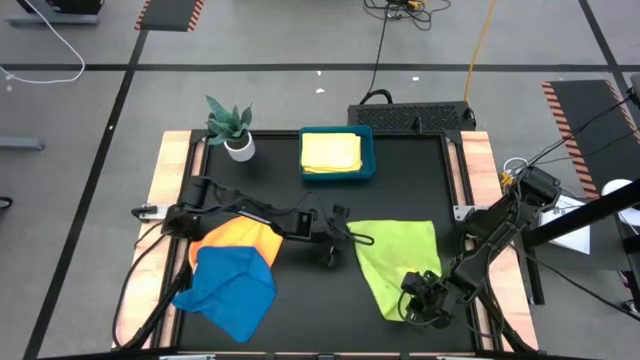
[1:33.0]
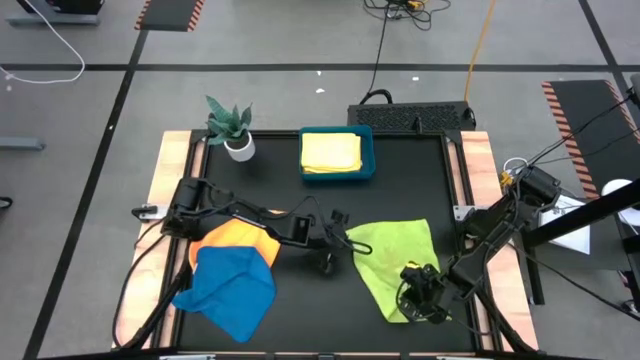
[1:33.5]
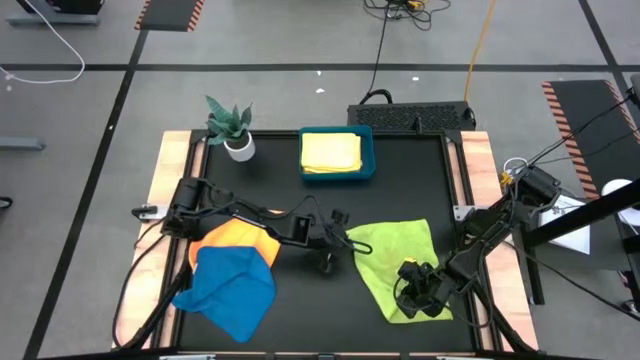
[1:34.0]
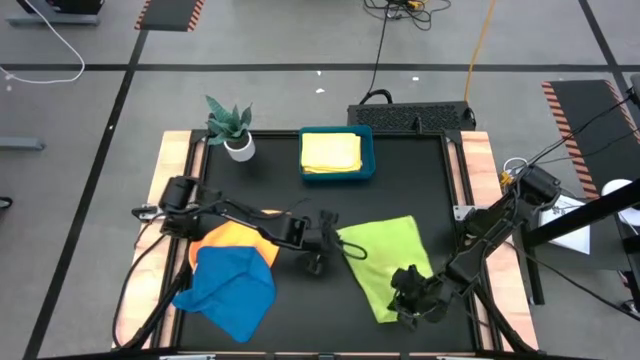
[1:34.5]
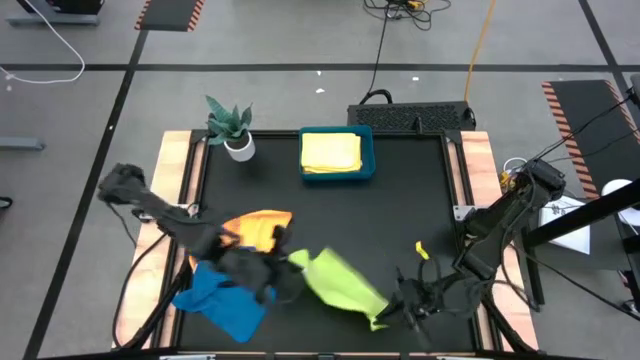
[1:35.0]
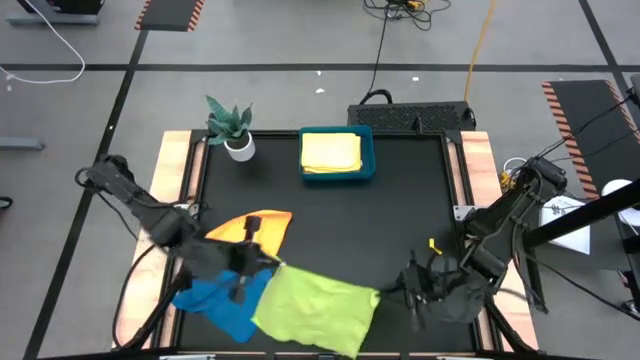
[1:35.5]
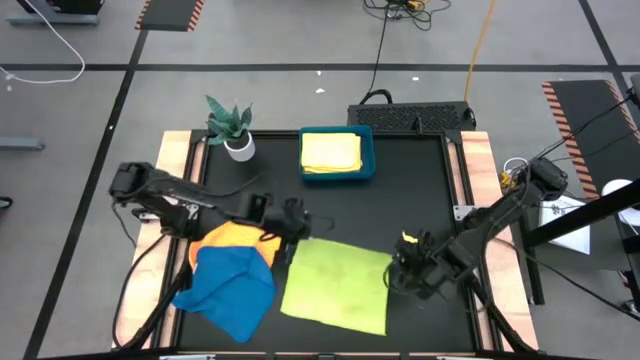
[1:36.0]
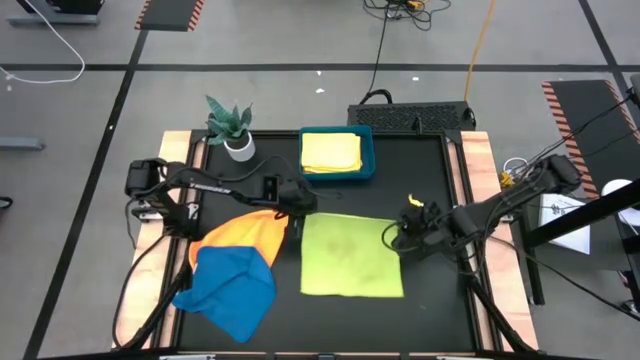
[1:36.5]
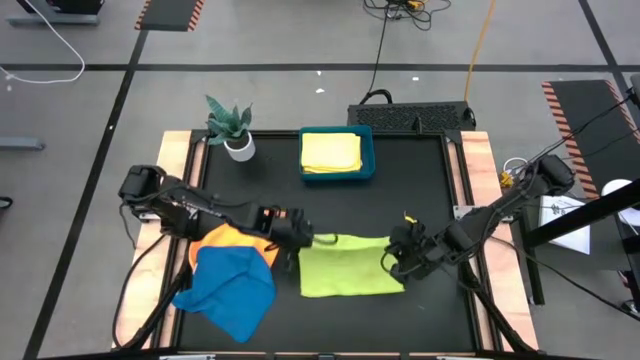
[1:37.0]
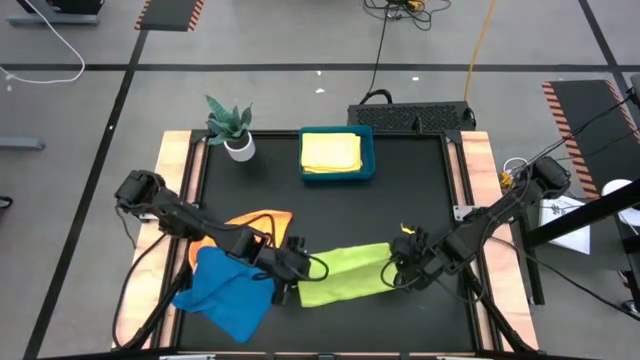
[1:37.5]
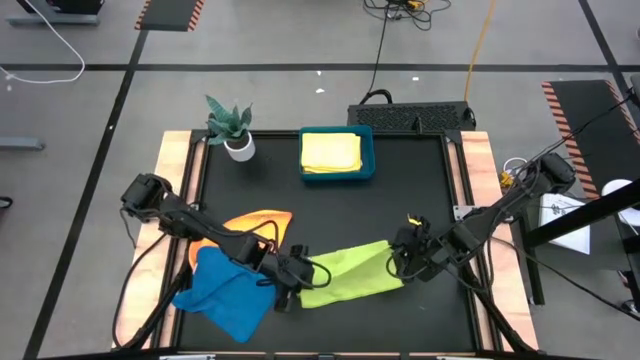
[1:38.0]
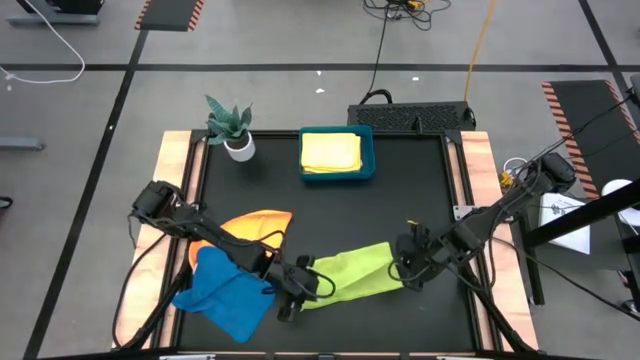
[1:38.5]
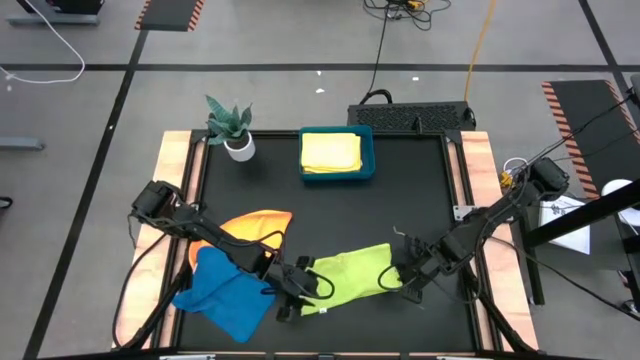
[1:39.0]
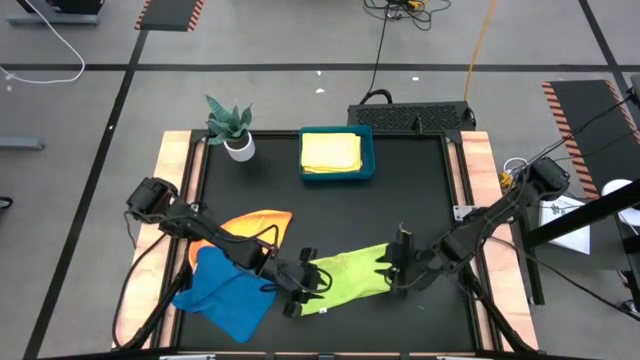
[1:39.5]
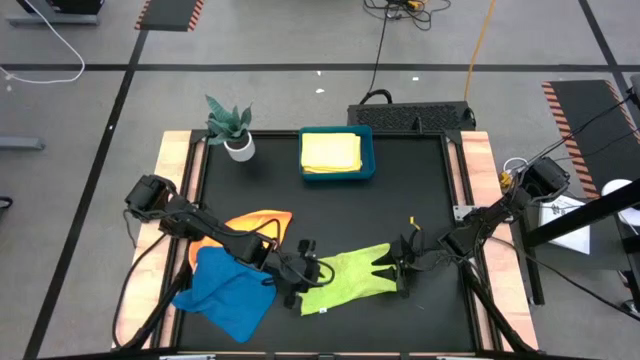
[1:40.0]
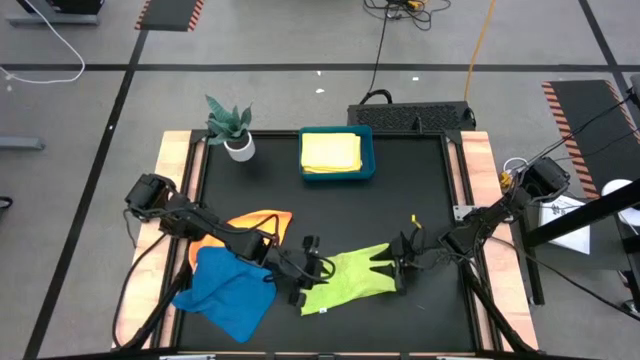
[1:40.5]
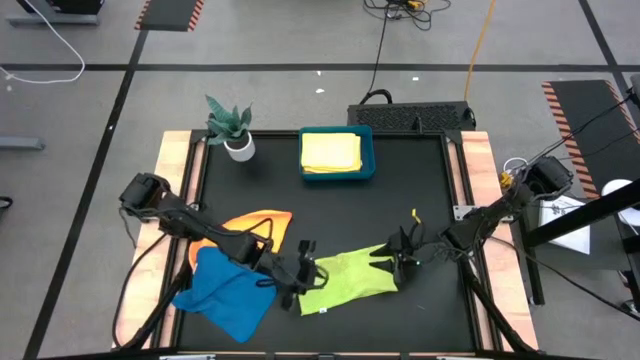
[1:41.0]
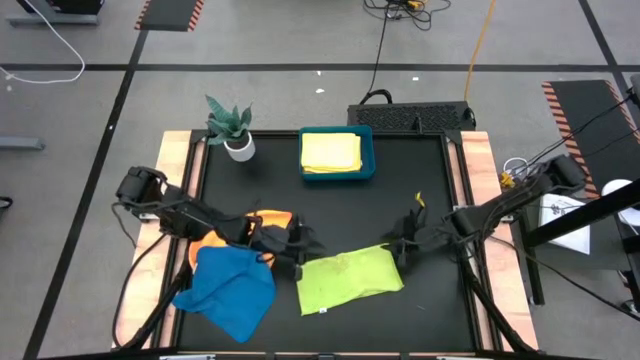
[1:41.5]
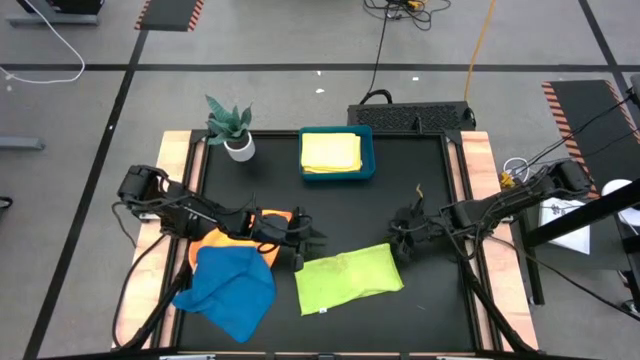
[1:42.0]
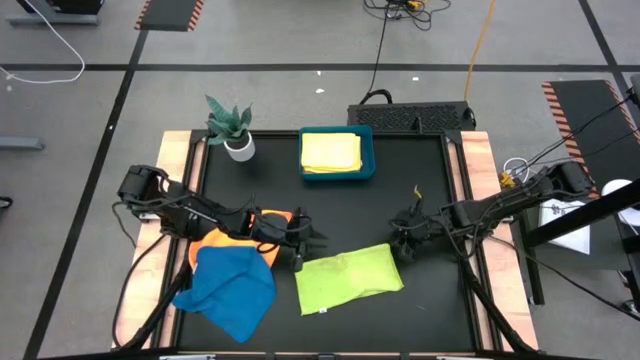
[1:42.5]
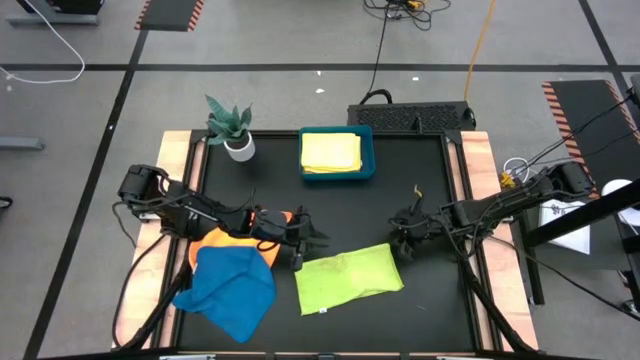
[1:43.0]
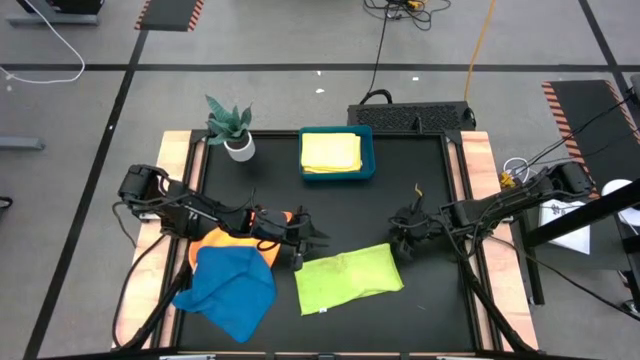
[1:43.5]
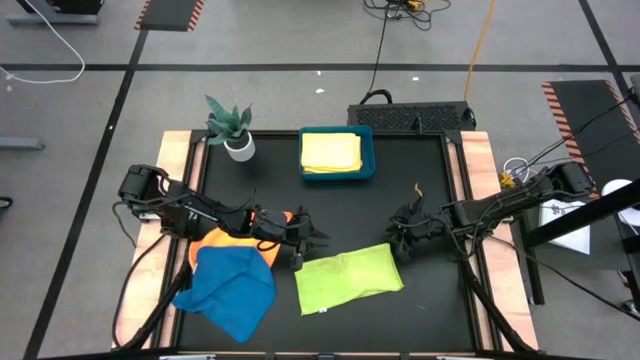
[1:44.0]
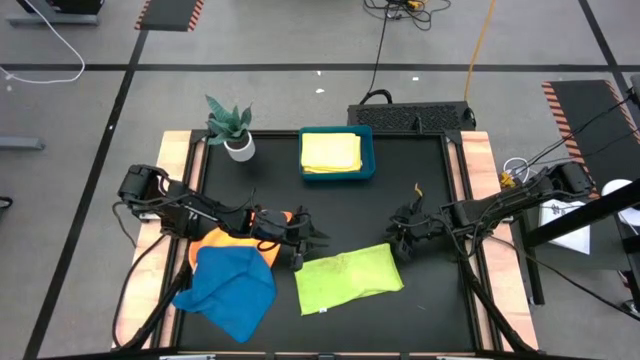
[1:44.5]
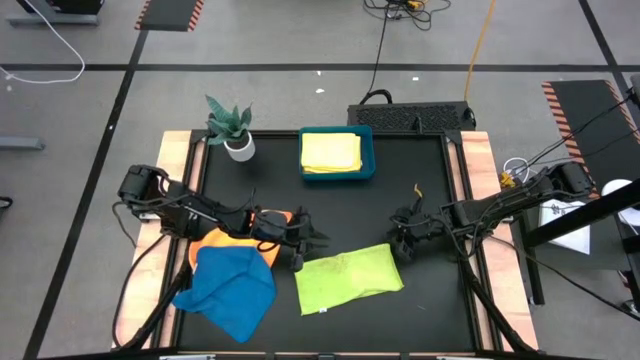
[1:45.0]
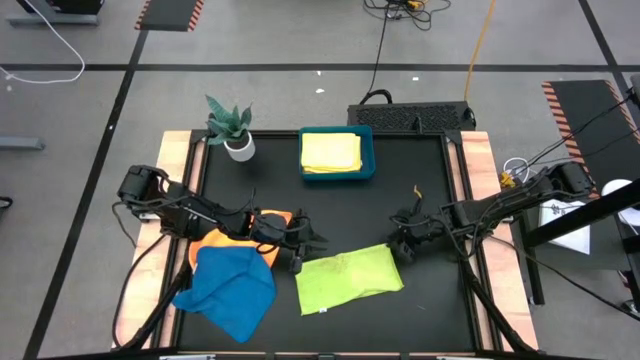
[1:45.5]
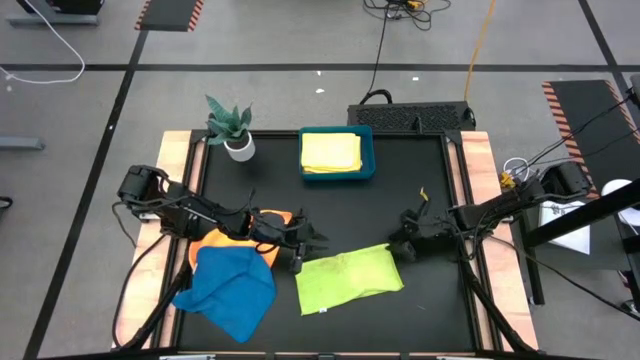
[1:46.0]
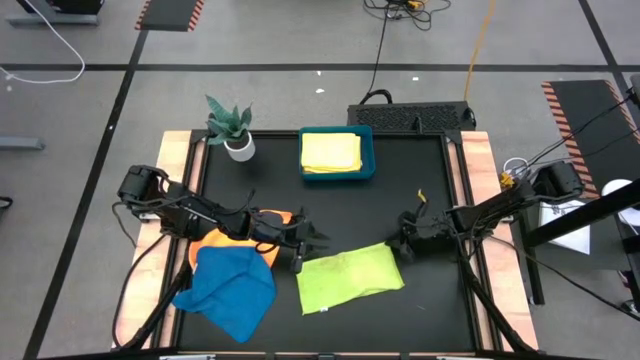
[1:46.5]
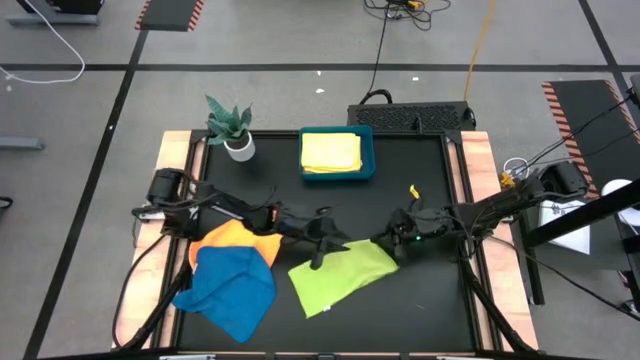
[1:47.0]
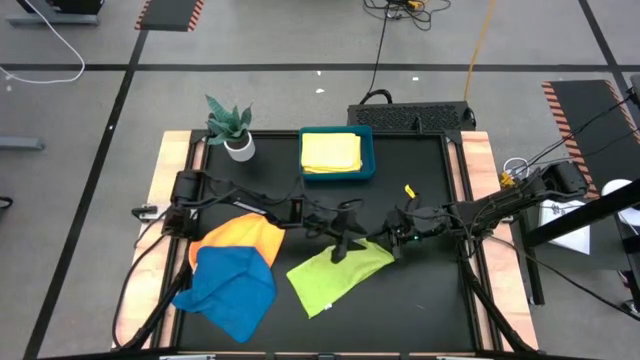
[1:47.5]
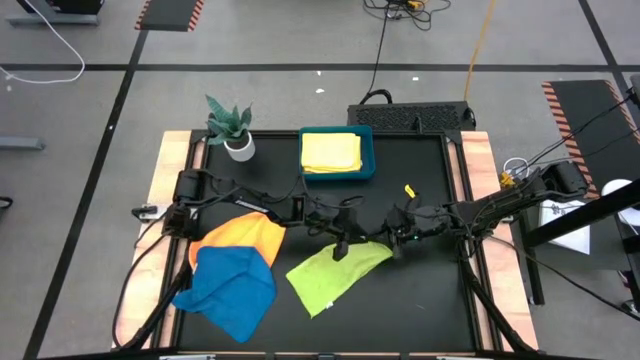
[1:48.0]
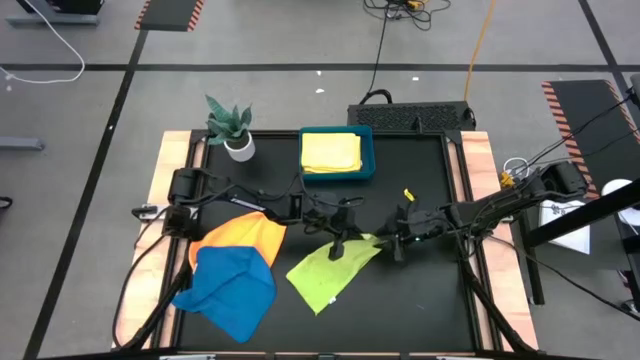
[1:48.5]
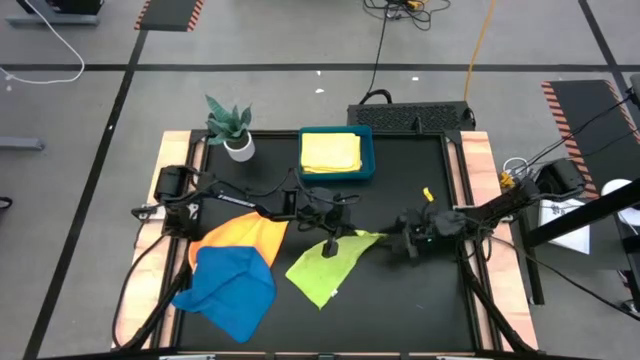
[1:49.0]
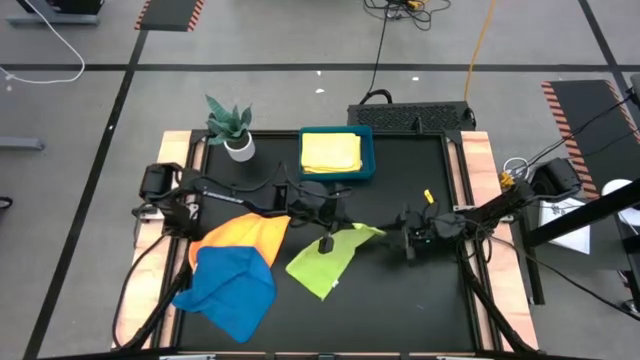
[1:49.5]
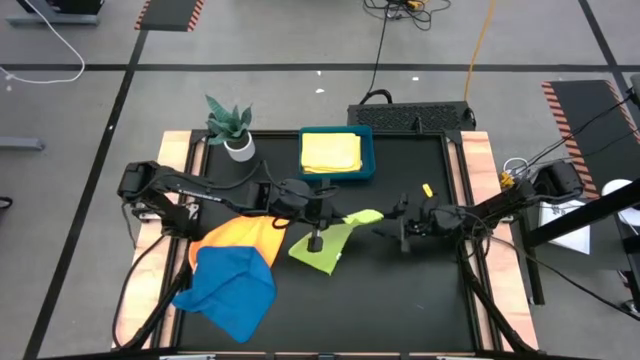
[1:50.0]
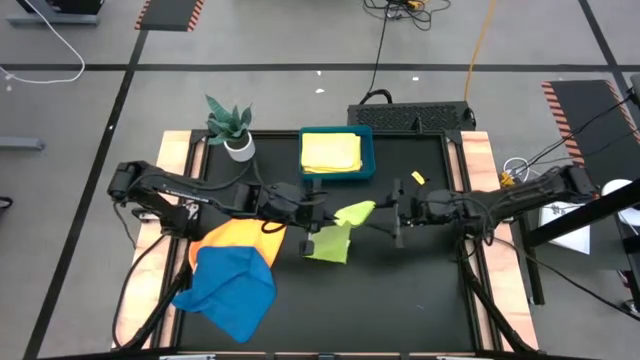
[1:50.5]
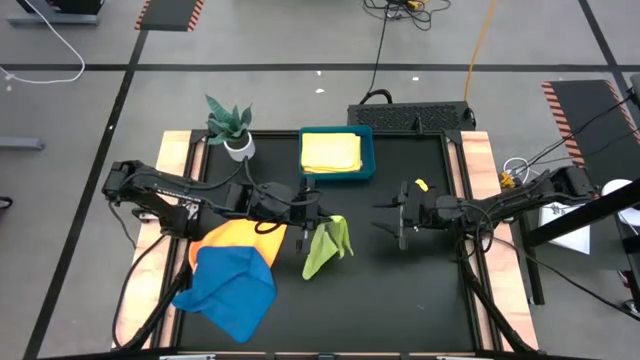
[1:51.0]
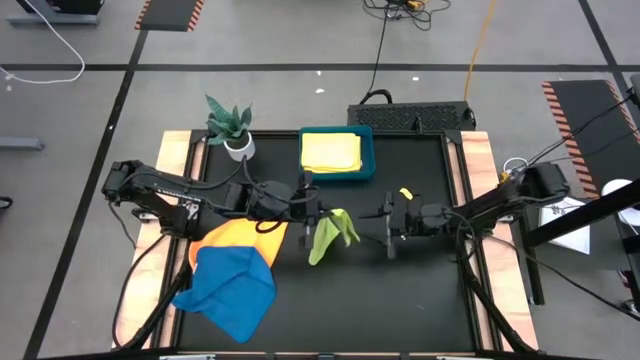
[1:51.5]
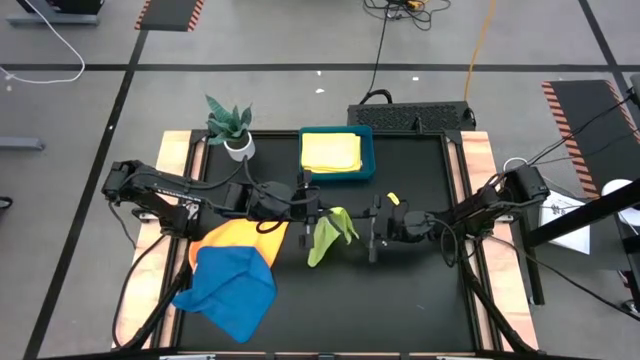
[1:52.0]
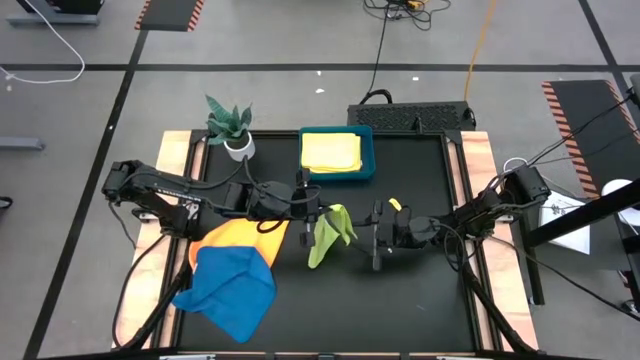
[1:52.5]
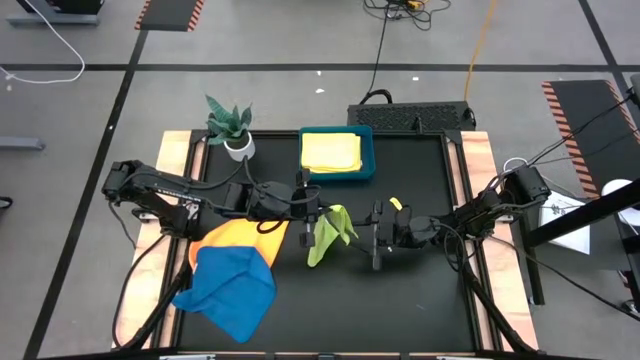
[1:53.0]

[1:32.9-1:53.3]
Task: Fold microfiber towels
Fold the green microfiber cloth

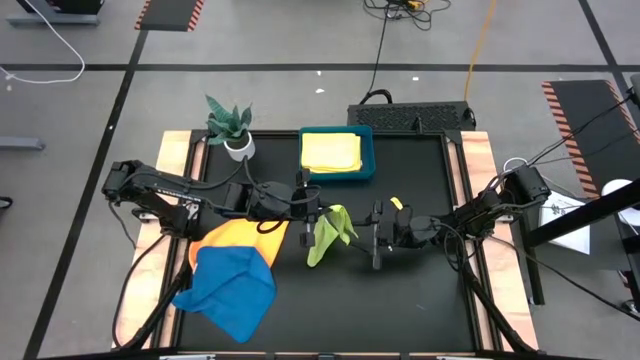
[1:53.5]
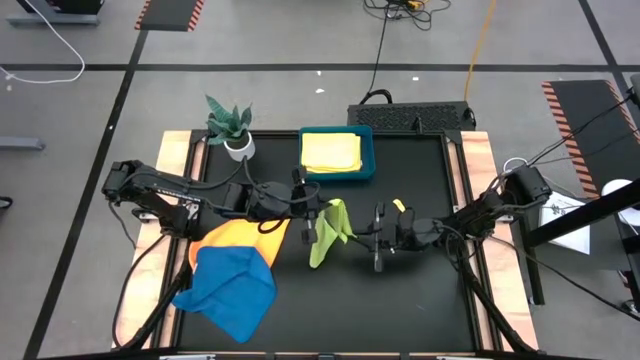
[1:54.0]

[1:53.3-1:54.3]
Fold the green microfiber cloth

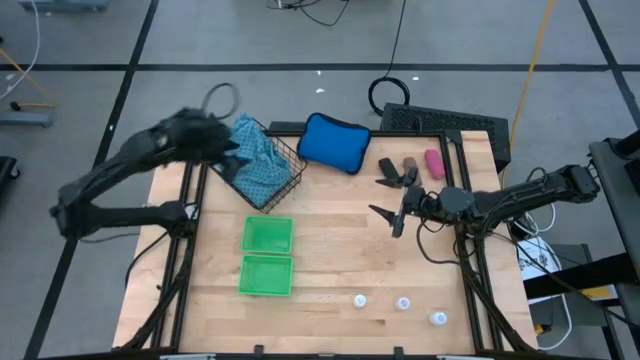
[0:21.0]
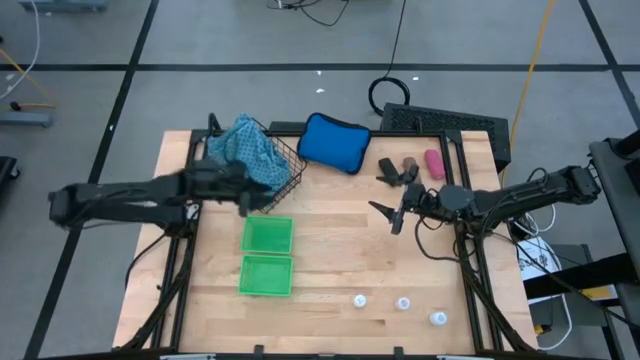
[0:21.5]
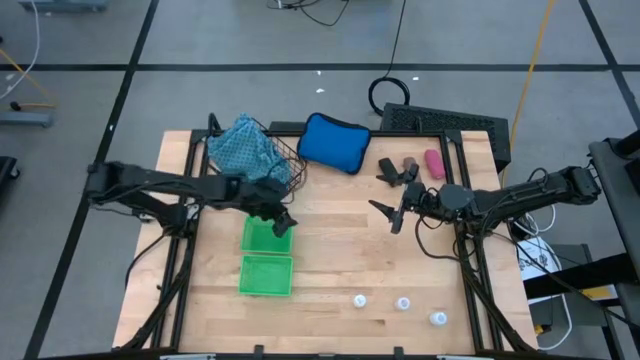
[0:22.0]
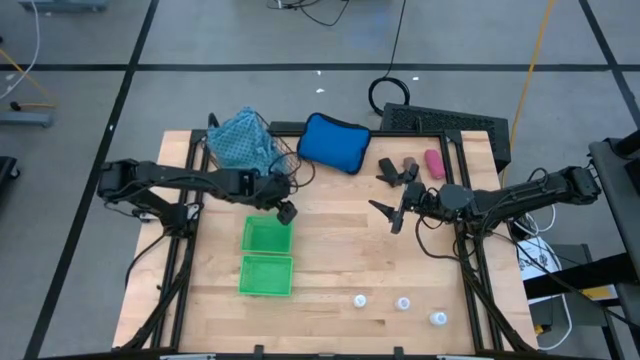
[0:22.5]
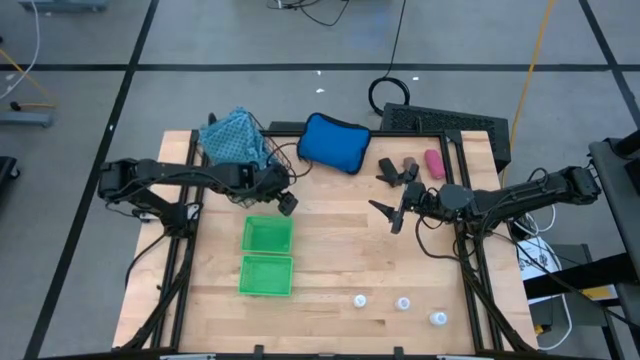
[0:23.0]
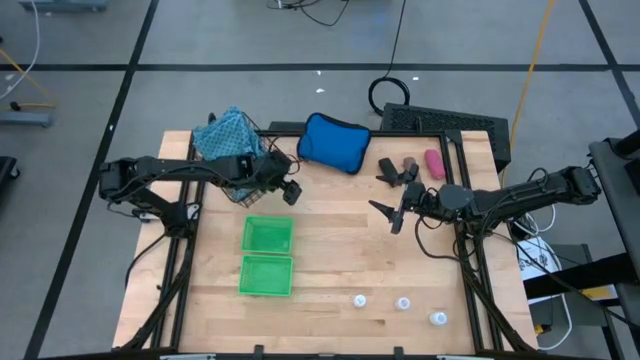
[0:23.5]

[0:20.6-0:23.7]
Task: Pick & Place Medicine items
Adjust the black wire basket on the table
